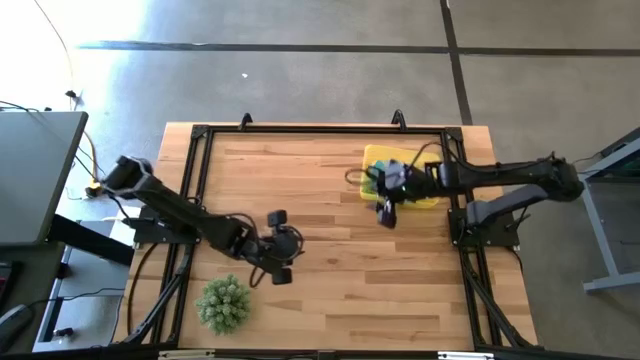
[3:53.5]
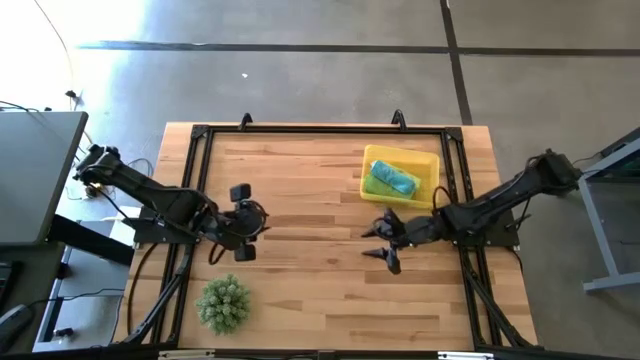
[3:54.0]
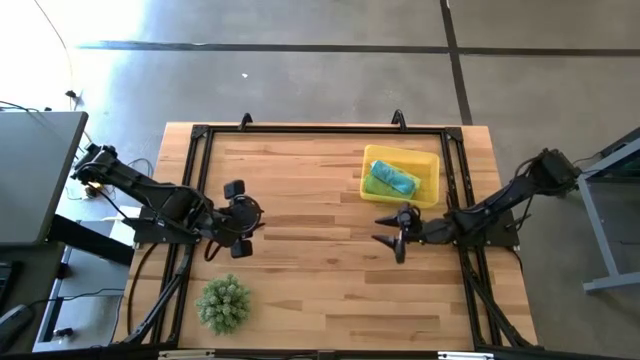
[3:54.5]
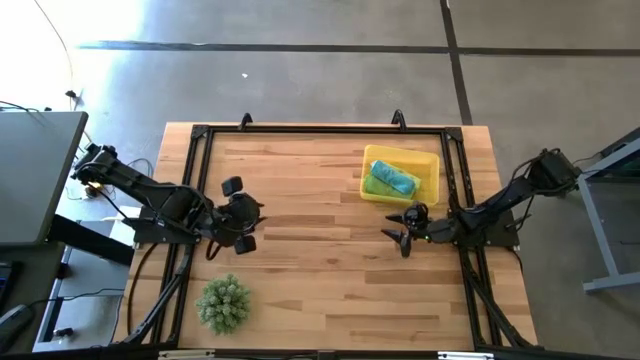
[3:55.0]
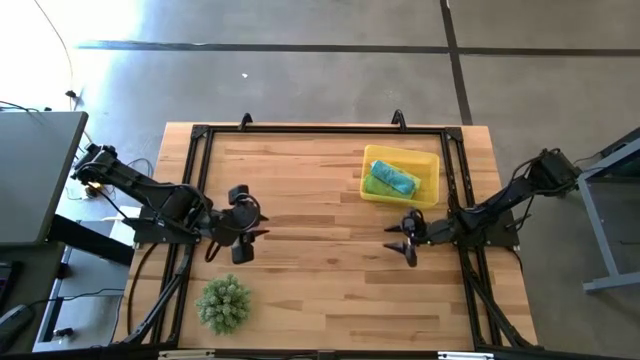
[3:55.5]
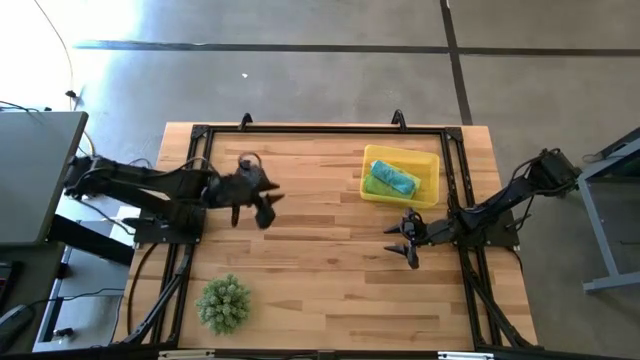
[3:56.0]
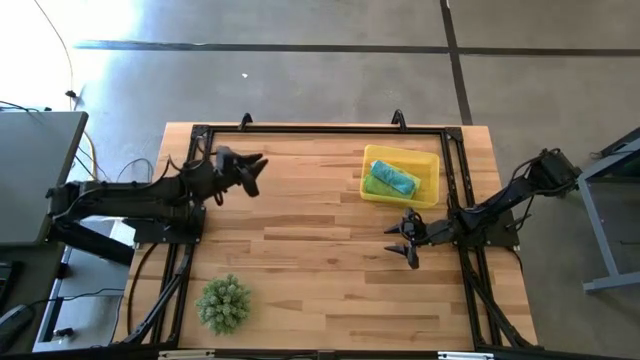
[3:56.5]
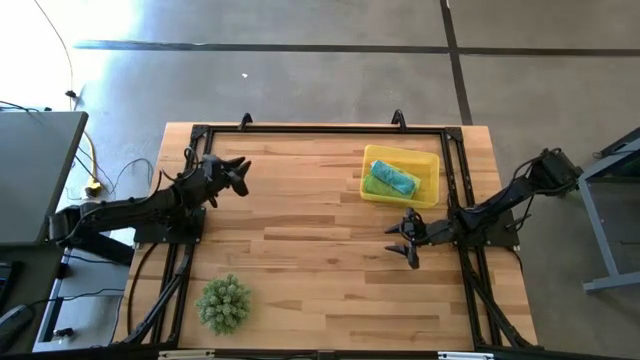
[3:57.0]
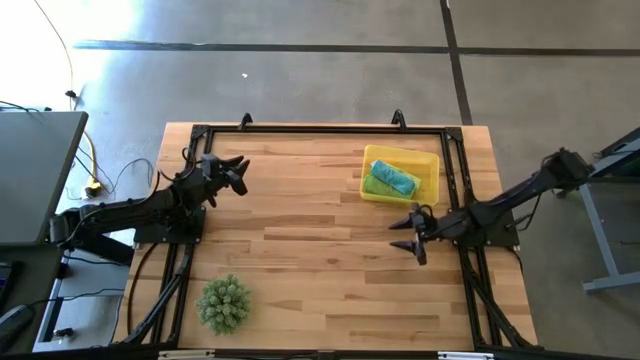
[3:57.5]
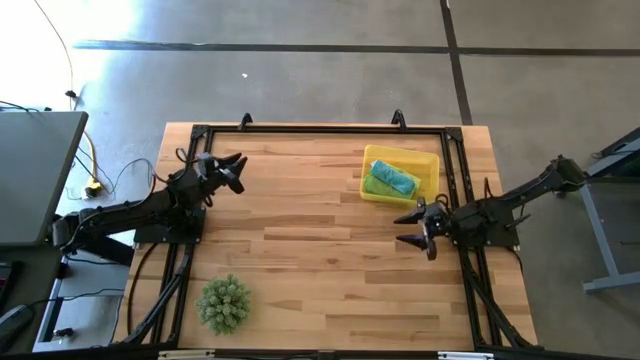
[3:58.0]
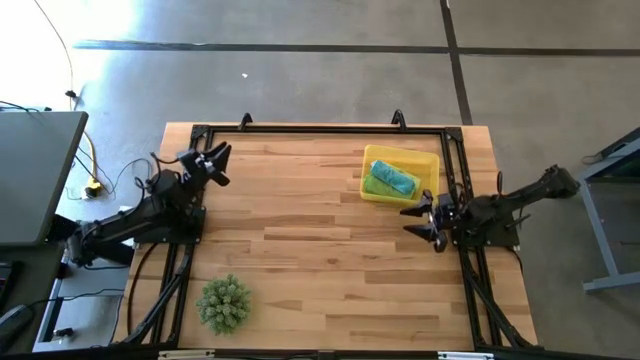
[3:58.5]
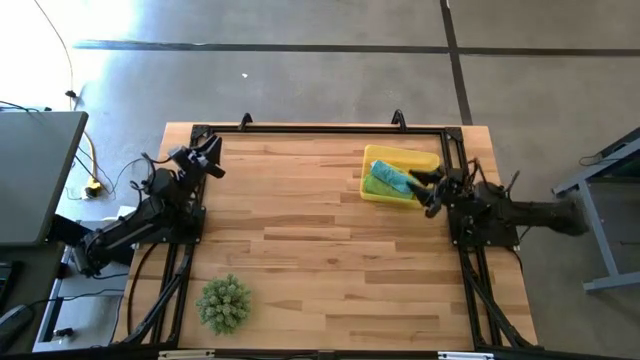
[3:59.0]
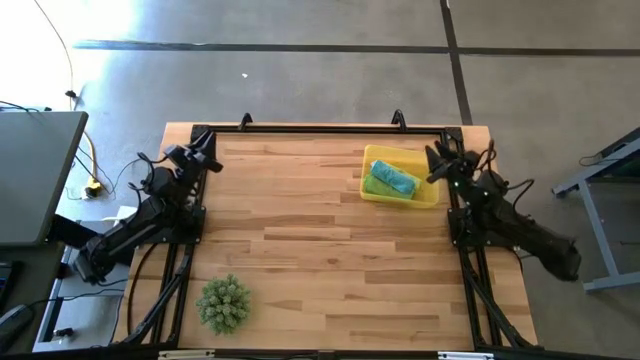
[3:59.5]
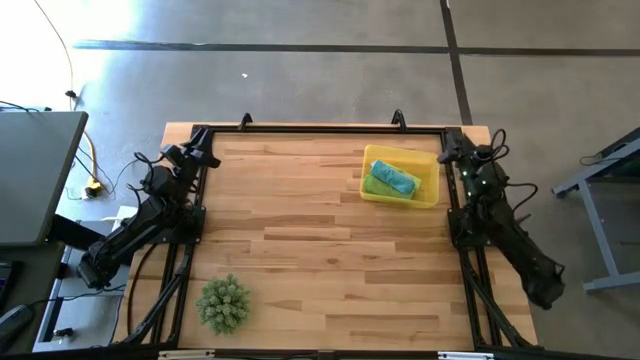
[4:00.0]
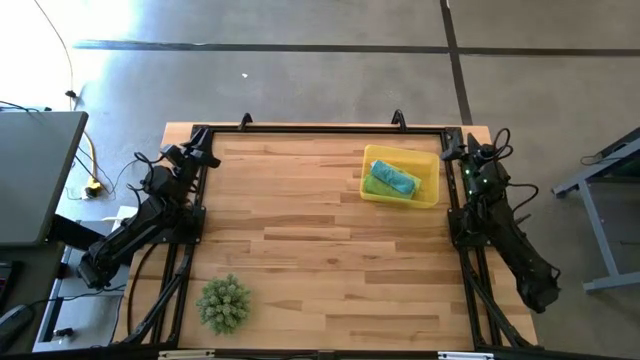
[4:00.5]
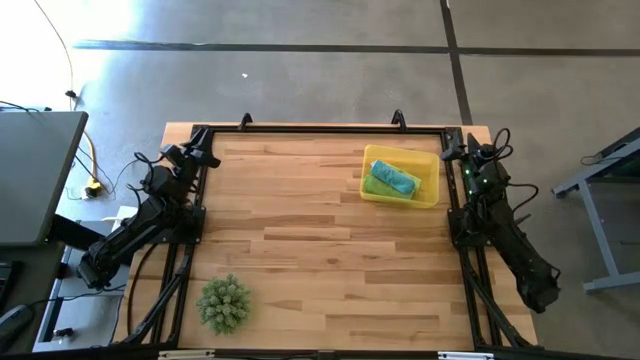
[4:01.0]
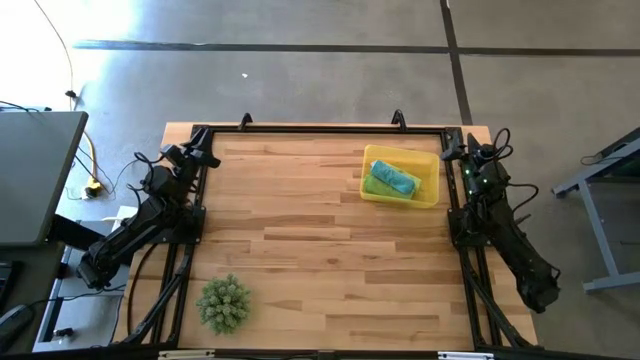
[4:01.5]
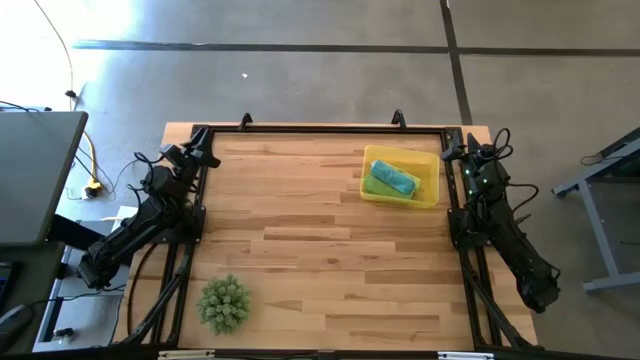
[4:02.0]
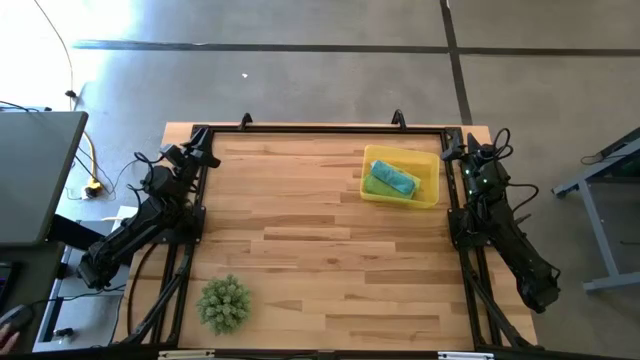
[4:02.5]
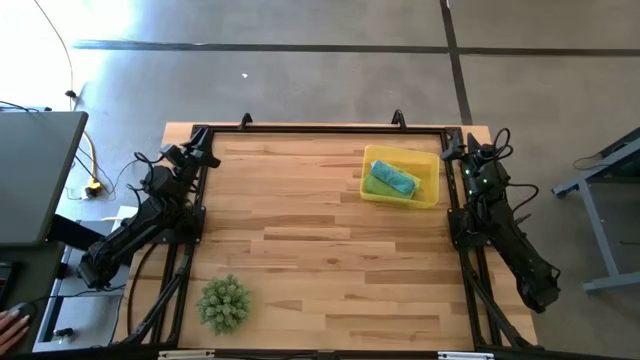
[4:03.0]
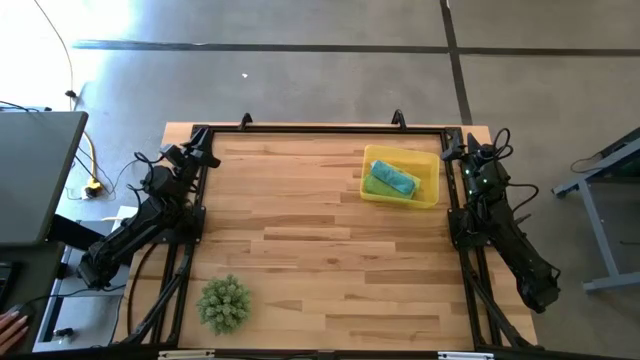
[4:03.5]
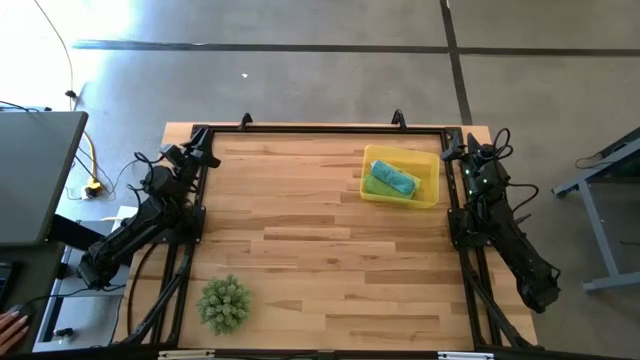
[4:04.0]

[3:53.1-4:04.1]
Task: Roll microfiber towels into tight, uniform cylinder then place into a basket
Return to Home Position

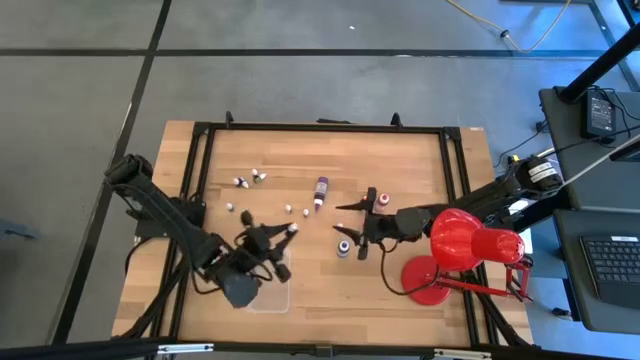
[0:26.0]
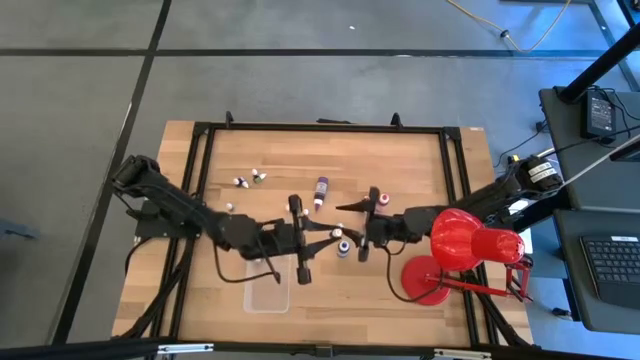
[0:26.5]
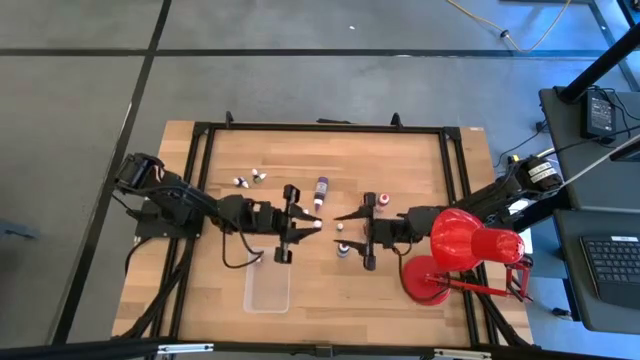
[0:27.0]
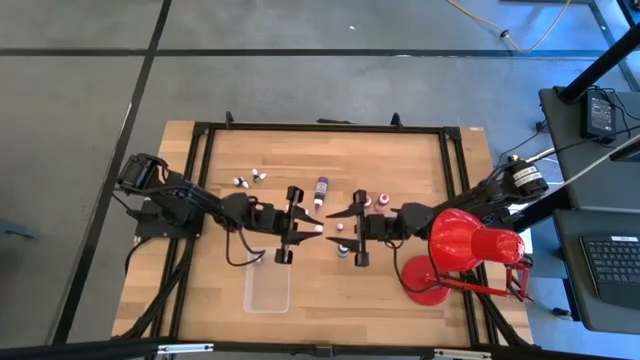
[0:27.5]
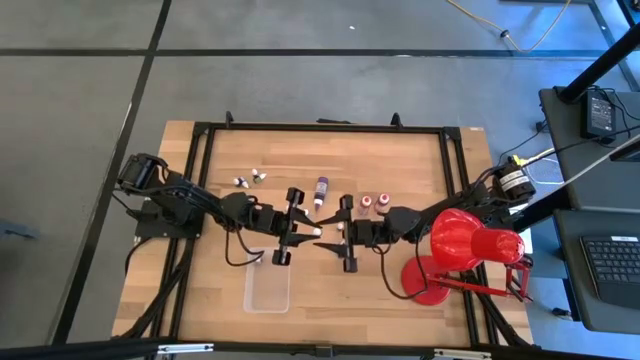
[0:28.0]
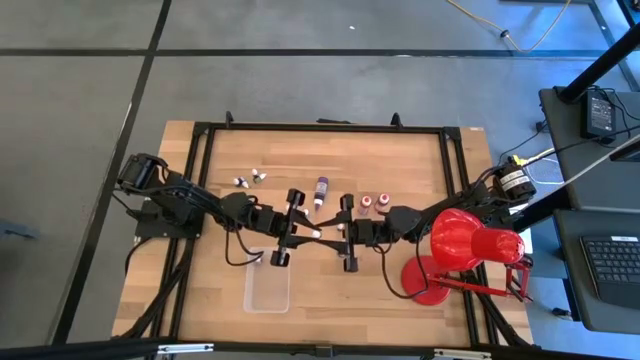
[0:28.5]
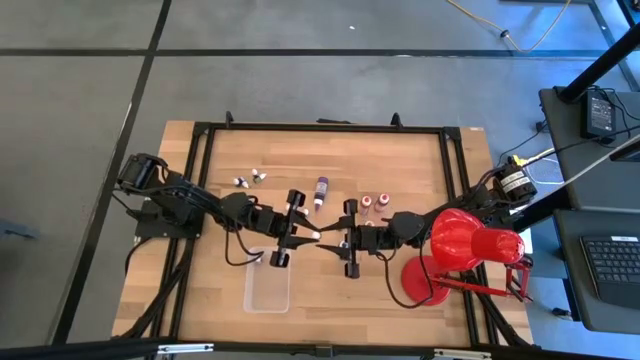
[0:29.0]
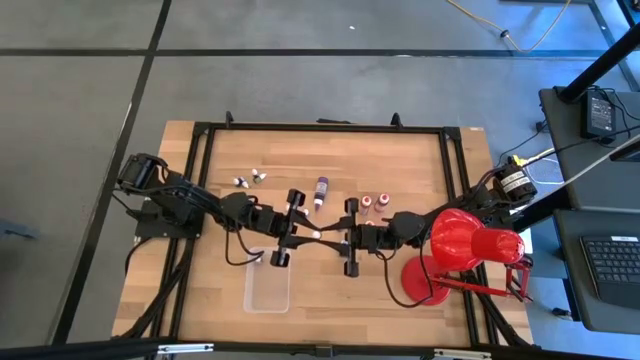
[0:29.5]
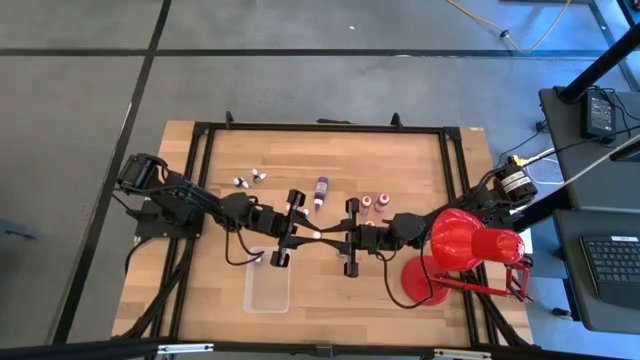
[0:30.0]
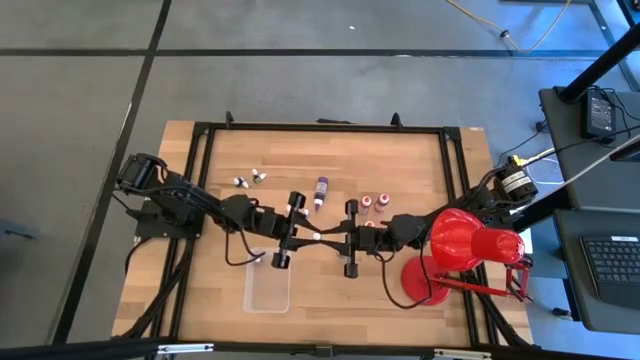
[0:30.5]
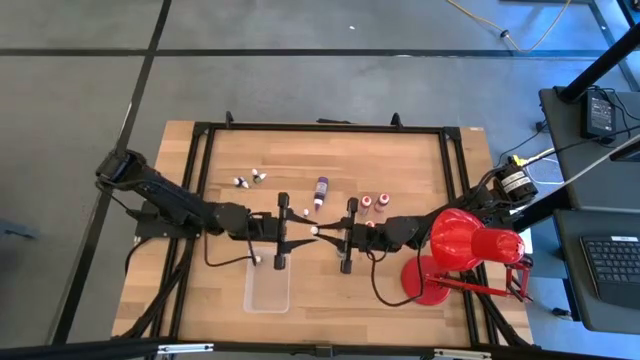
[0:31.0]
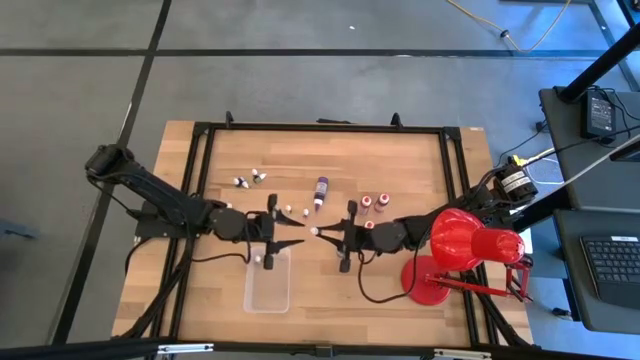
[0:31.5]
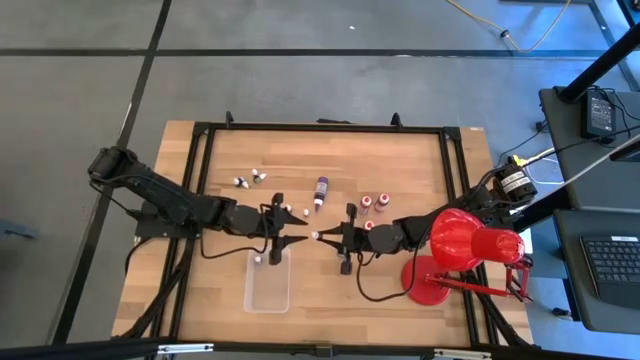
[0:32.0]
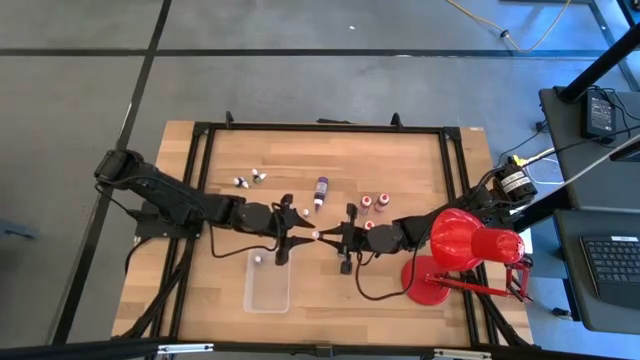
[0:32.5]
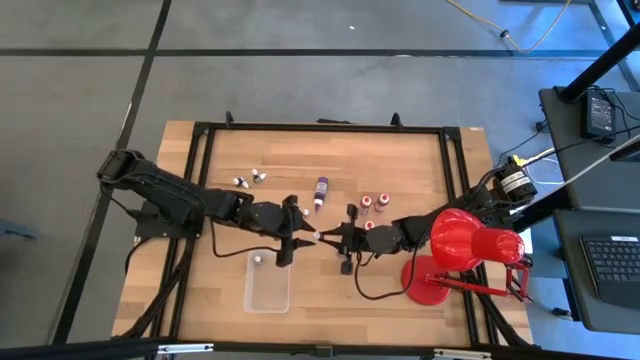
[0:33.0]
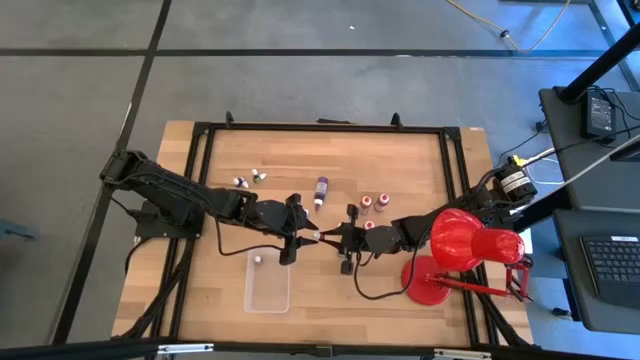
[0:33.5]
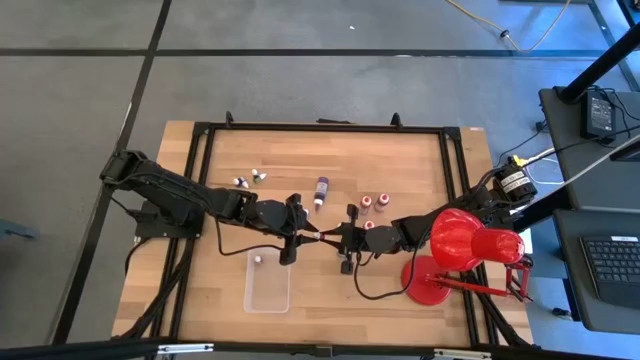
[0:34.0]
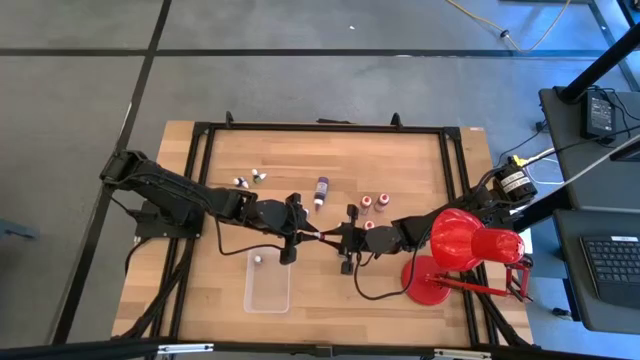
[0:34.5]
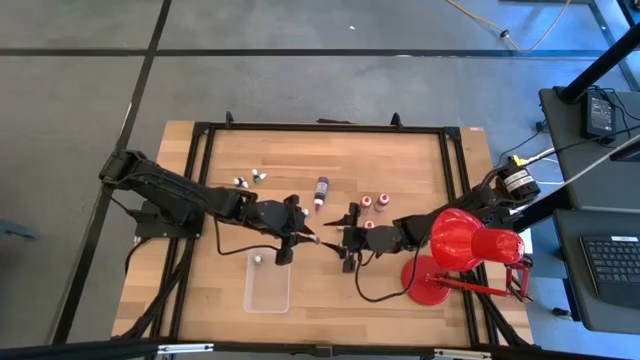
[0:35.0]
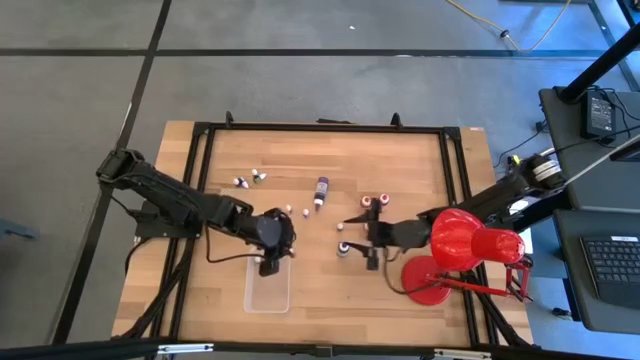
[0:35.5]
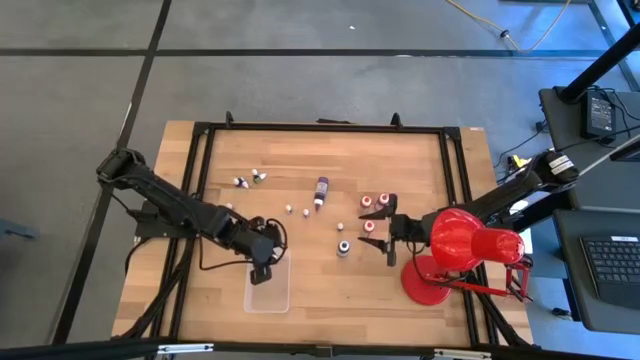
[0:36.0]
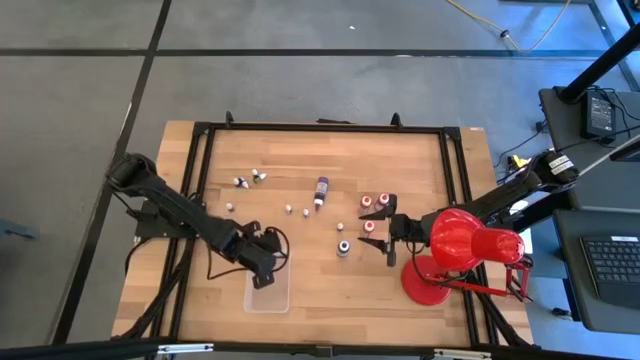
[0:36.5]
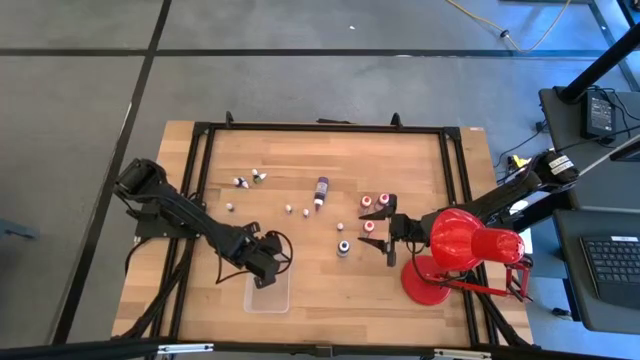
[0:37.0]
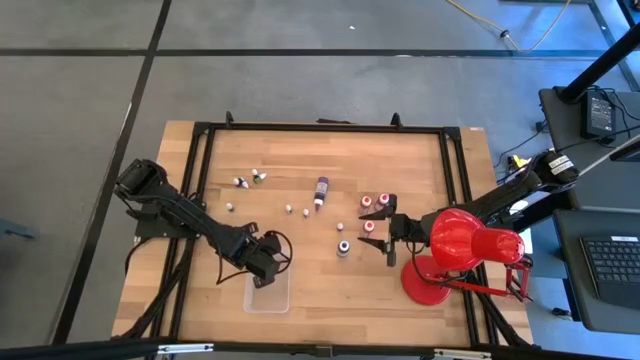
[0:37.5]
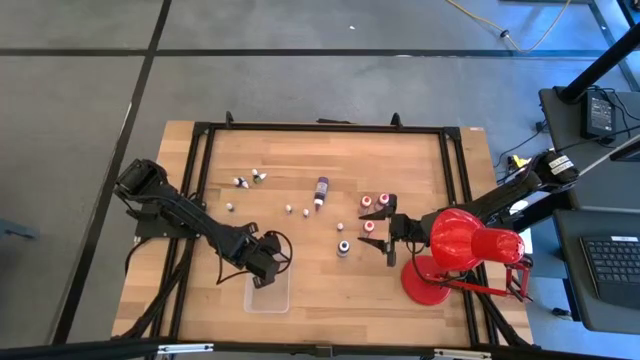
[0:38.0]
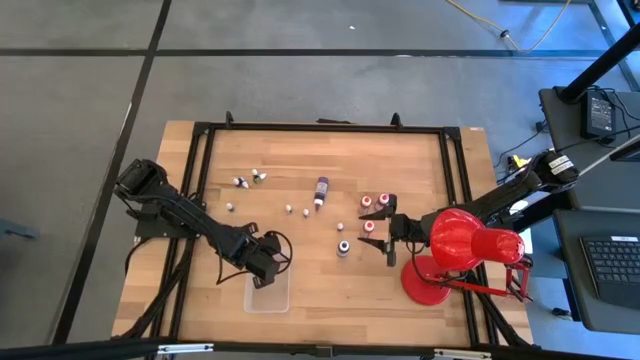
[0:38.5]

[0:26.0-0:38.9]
Task: Pick & Place food coloring
Put the small red food coloring bottle into the bin
